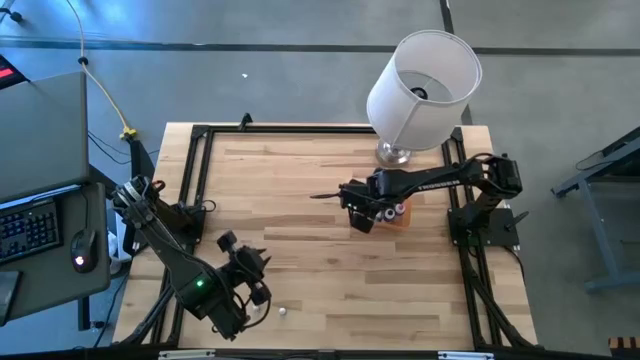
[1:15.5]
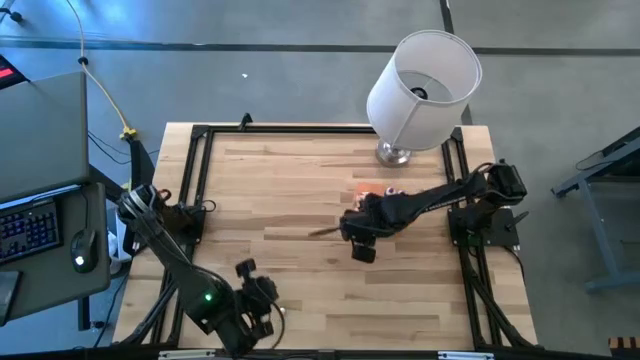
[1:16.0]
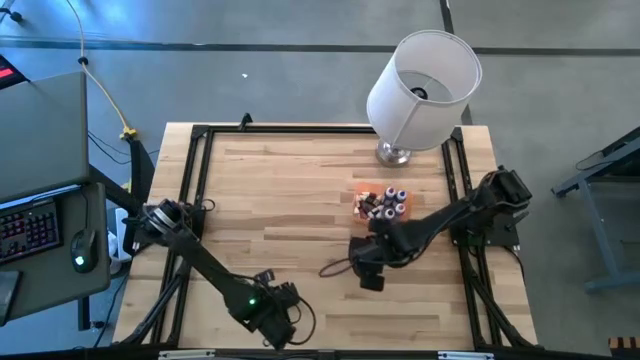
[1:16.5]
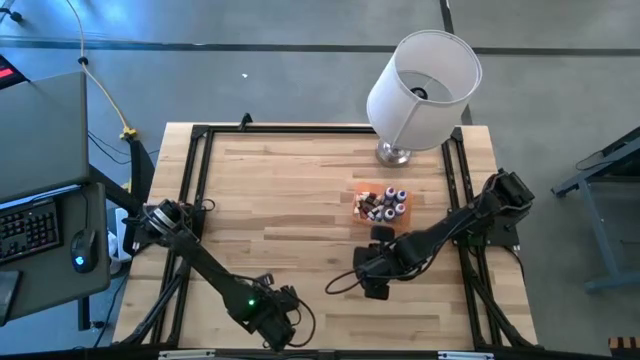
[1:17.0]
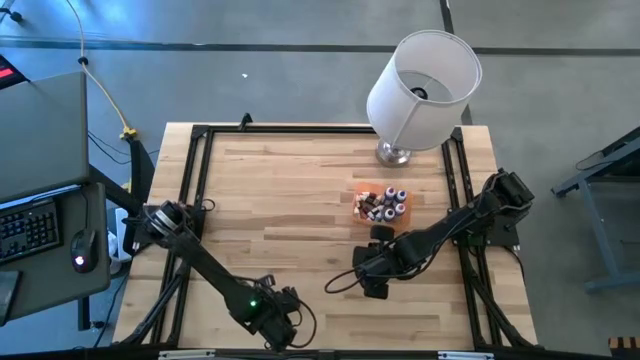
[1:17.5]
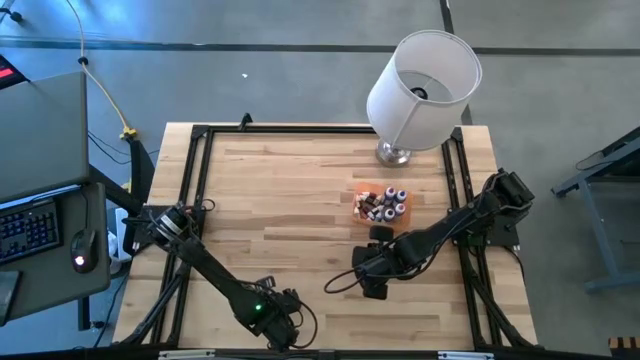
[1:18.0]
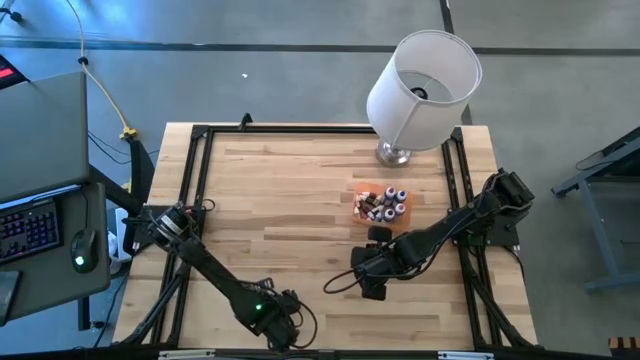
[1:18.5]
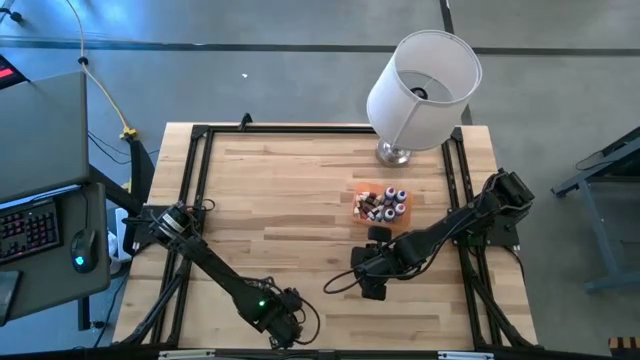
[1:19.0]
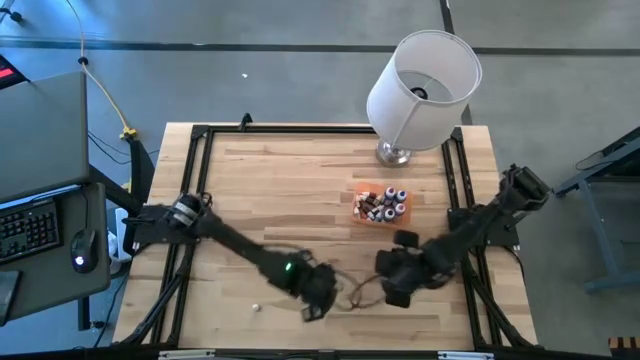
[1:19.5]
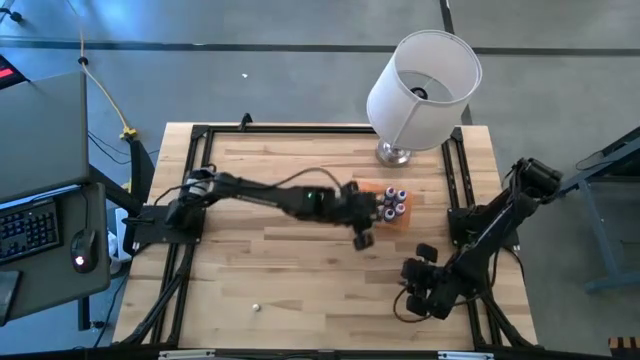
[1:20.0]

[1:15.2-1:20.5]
Task: Pick & Place food coloring
Put the small black food coloring bottle into the orange container

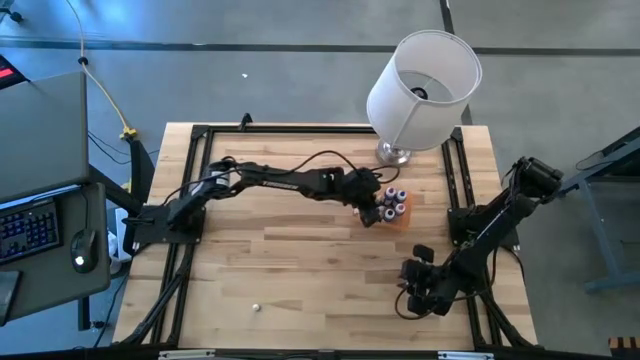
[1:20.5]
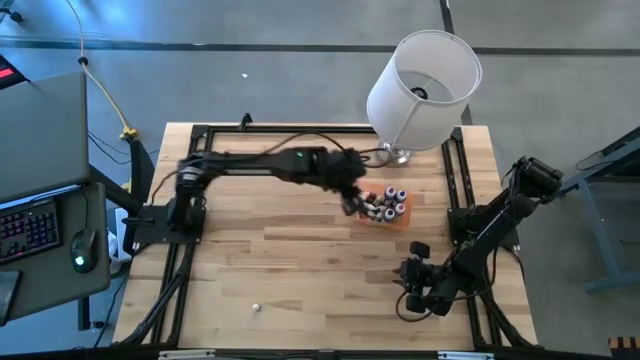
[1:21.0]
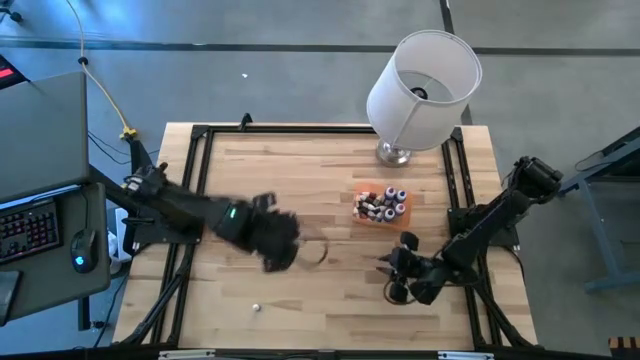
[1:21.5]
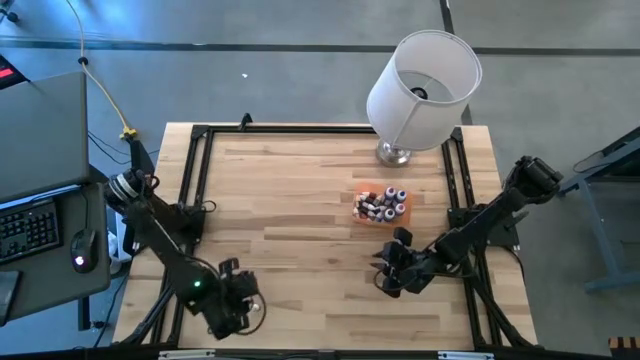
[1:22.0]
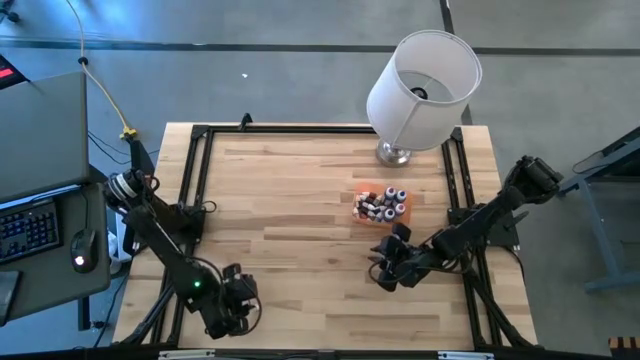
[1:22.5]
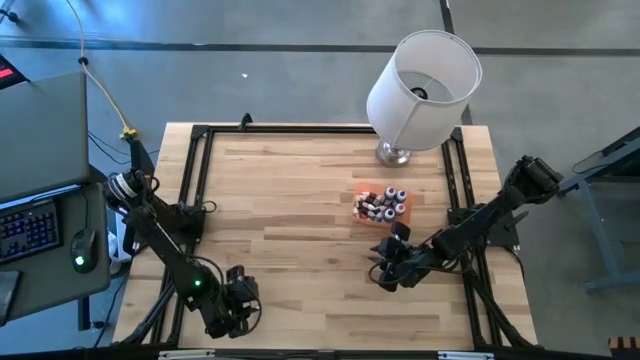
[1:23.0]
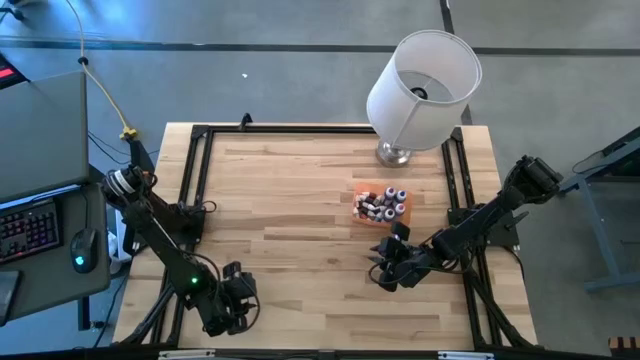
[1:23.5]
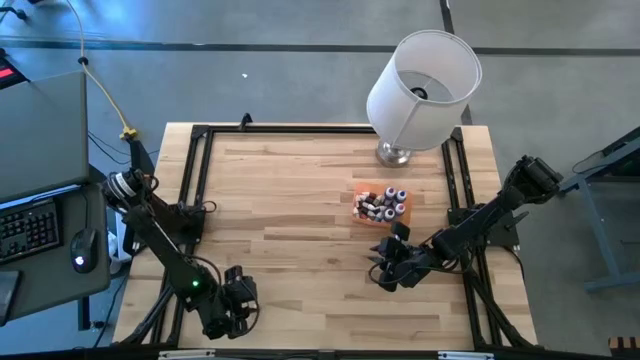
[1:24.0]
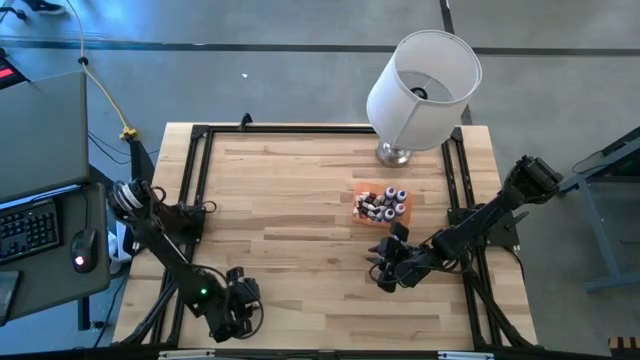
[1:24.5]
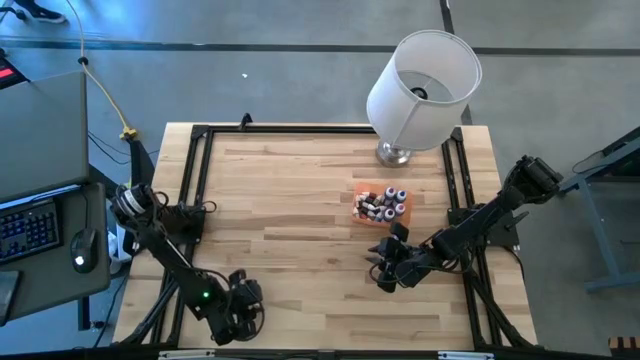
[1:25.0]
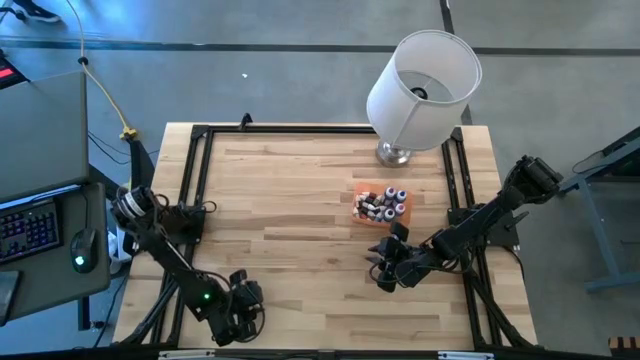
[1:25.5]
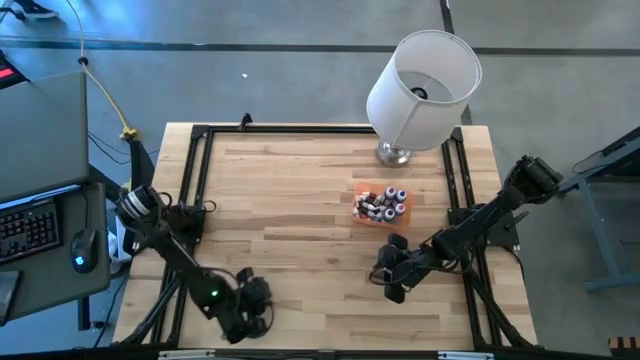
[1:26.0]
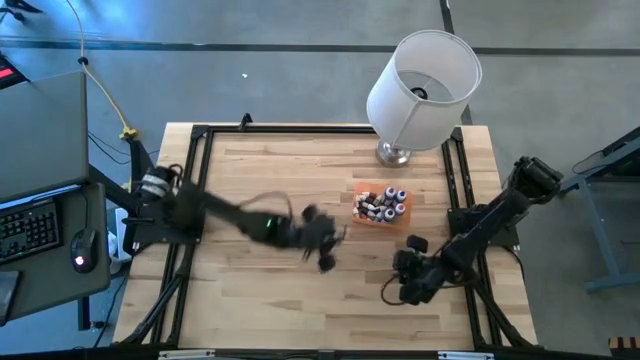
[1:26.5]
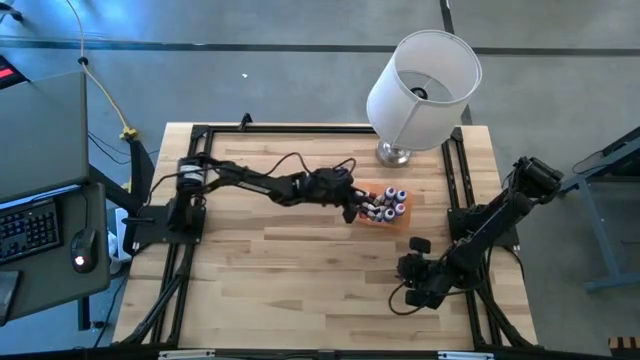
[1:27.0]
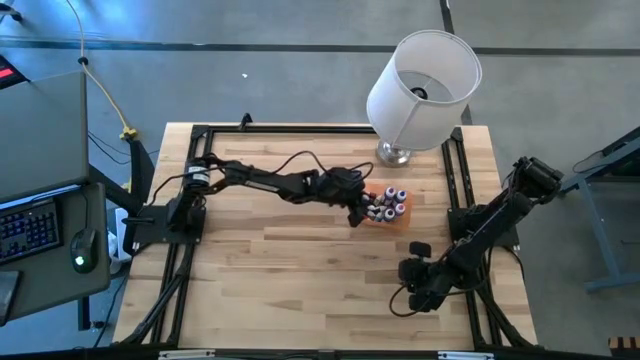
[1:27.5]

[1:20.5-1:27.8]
Put the small purple food coloring bottle into the orange container

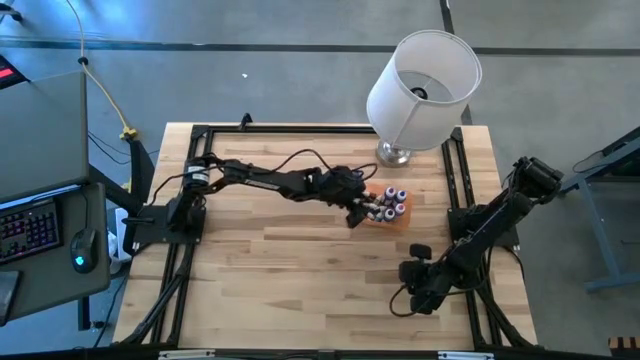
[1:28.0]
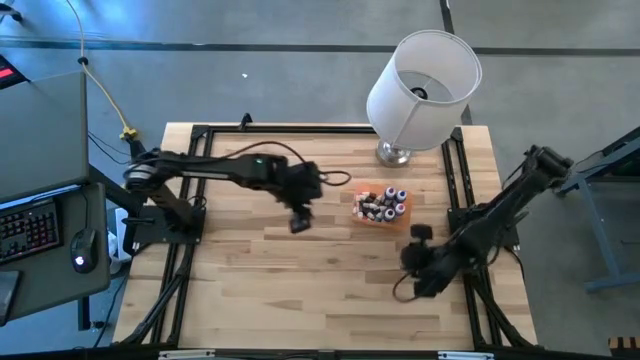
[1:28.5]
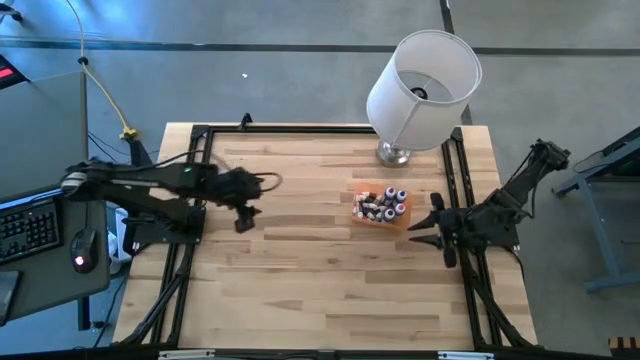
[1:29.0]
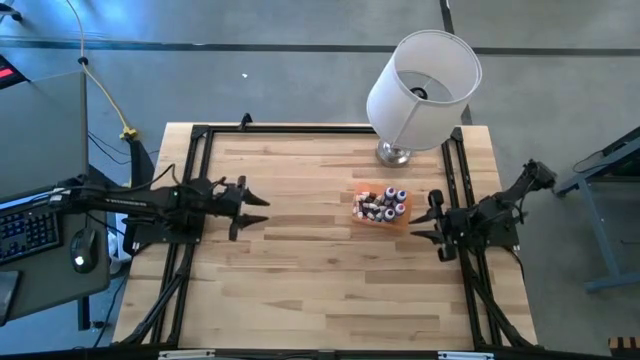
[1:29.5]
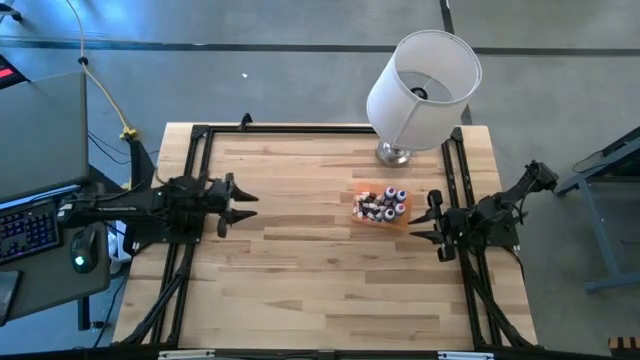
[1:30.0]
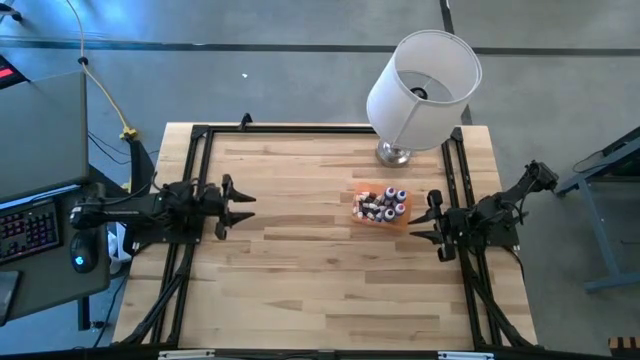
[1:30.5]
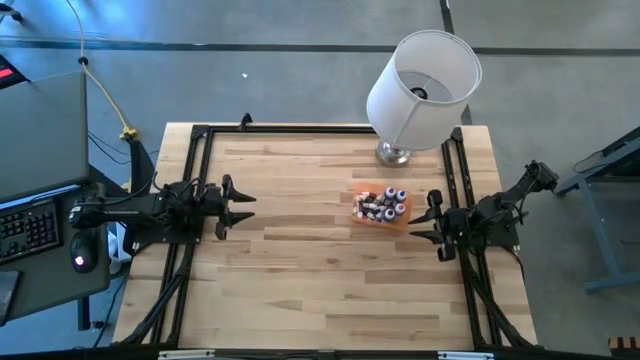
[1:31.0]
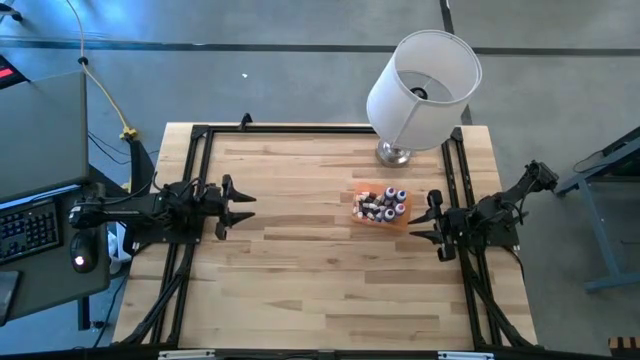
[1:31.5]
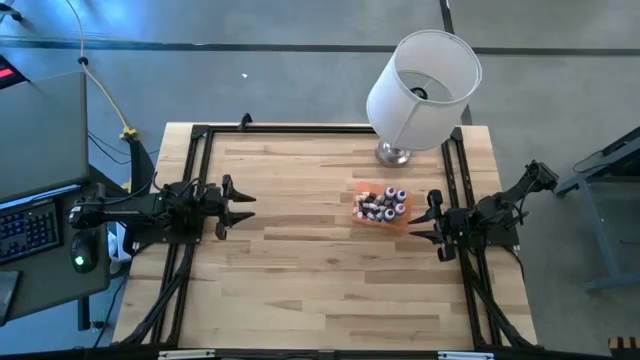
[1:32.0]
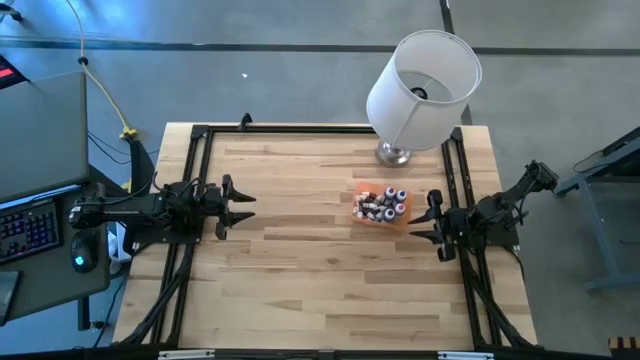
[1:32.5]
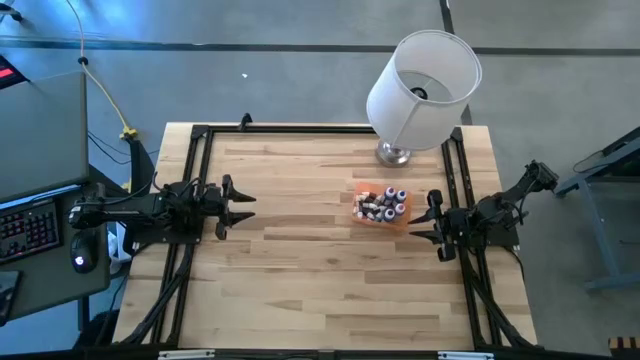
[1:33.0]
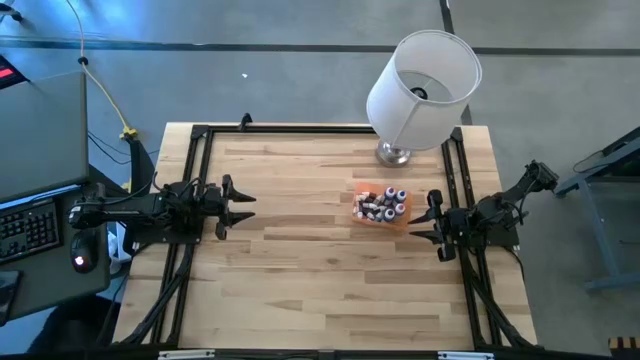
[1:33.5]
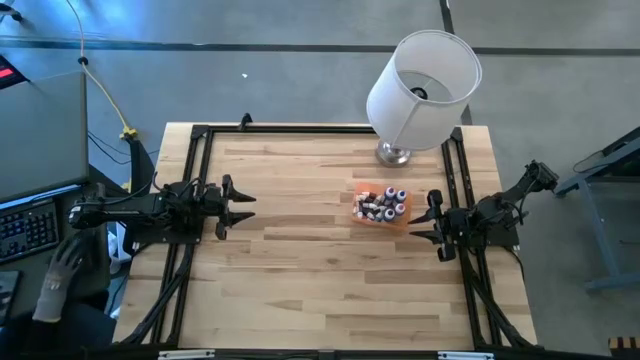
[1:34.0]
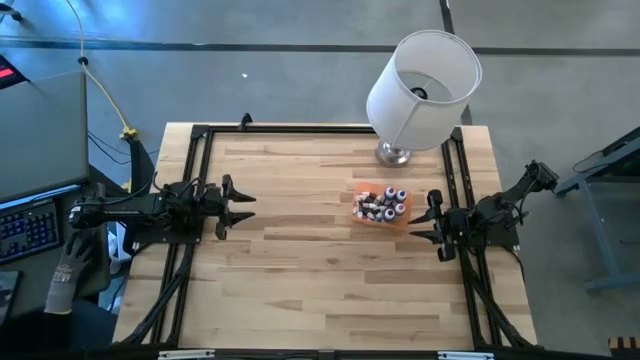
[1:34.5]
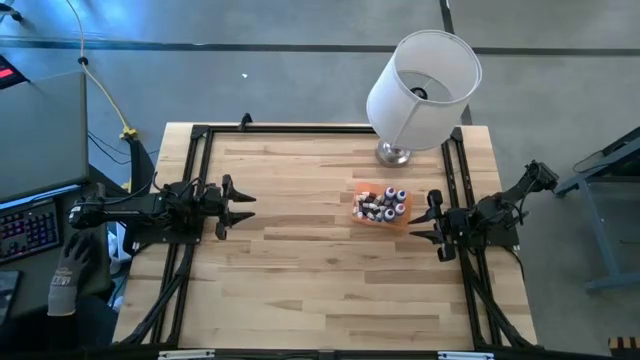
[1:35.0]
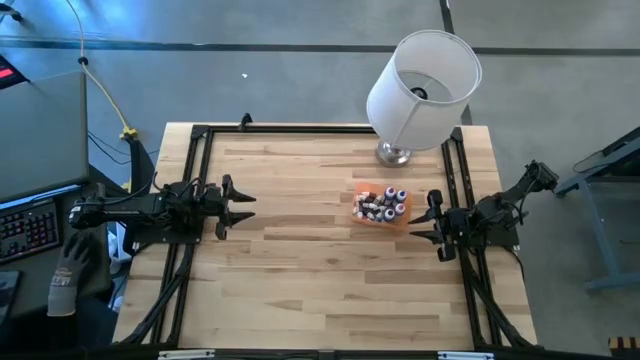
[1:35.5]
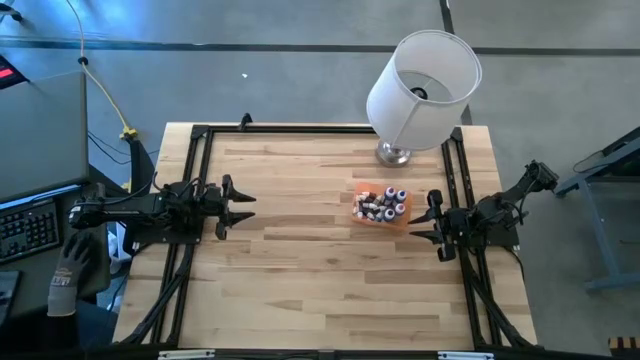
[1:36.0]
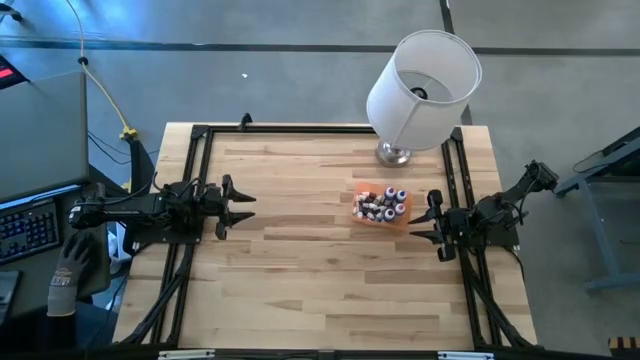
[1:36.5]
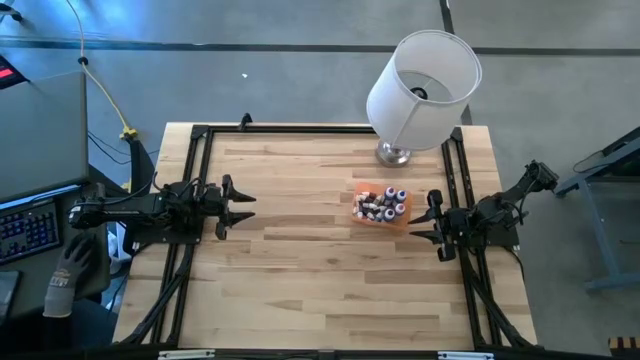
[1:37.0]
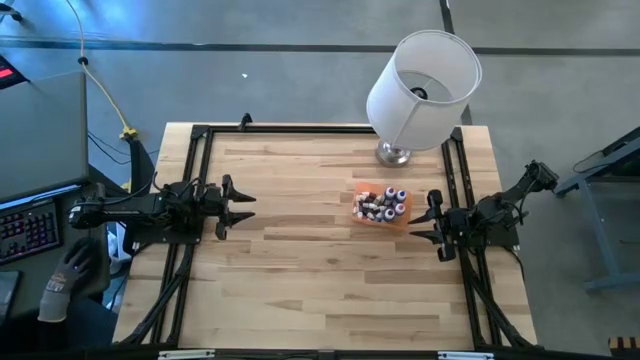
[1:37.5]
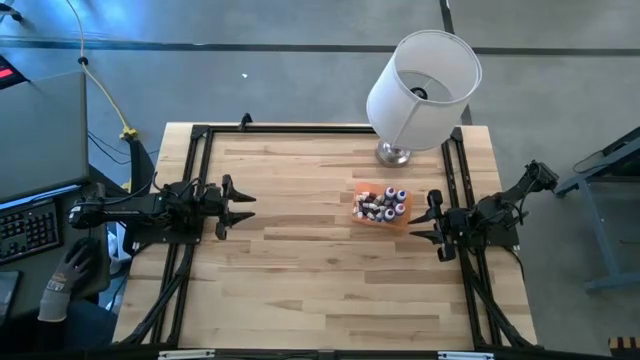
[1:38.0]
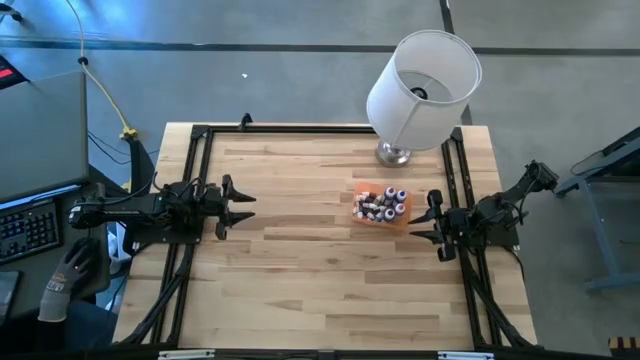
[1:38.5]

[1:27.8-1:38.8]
Return to Home Position
